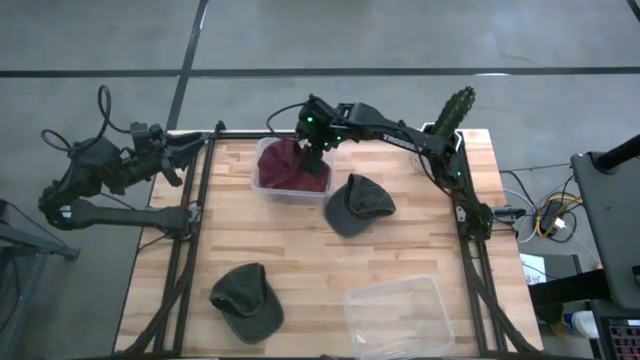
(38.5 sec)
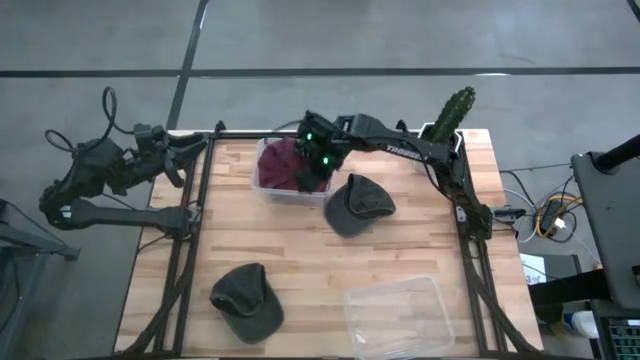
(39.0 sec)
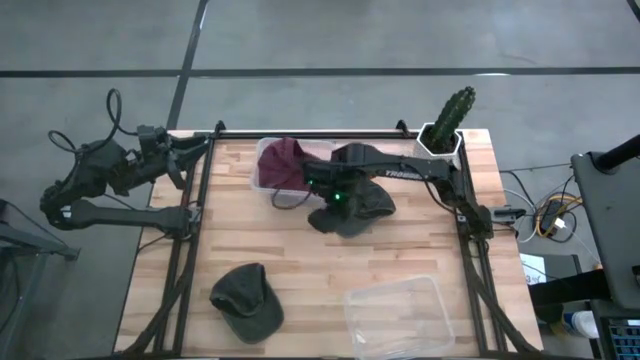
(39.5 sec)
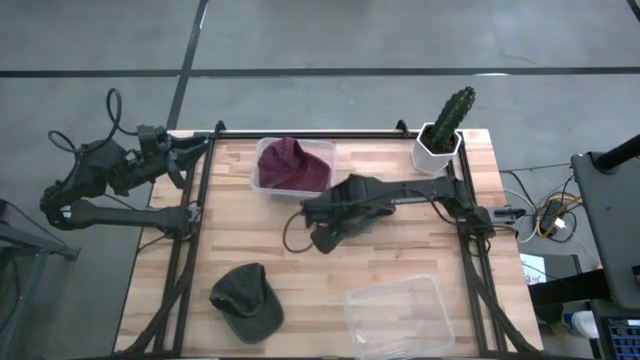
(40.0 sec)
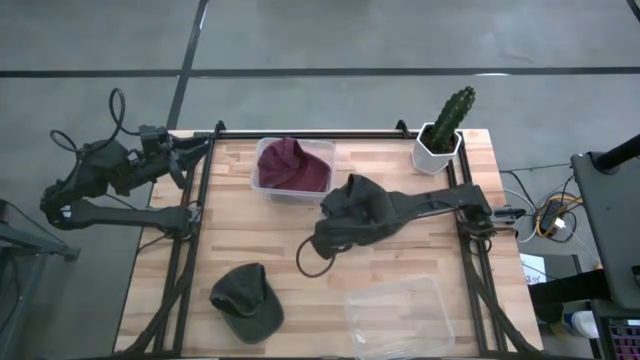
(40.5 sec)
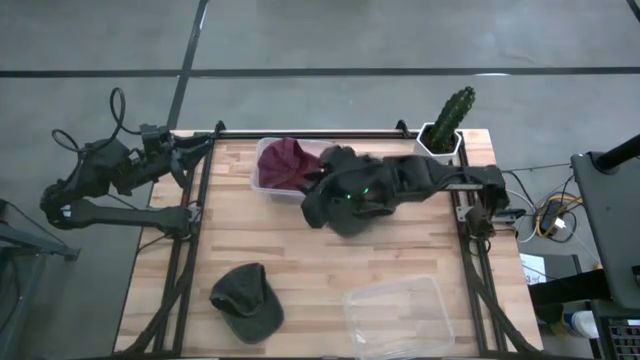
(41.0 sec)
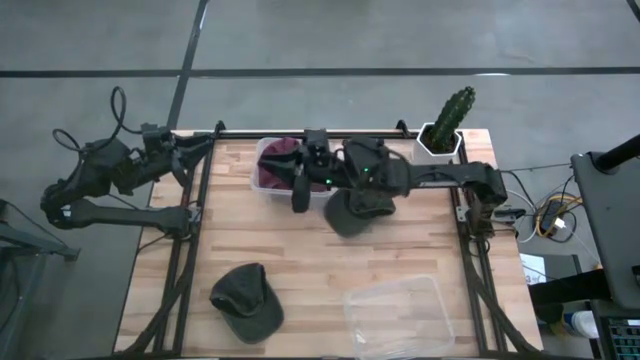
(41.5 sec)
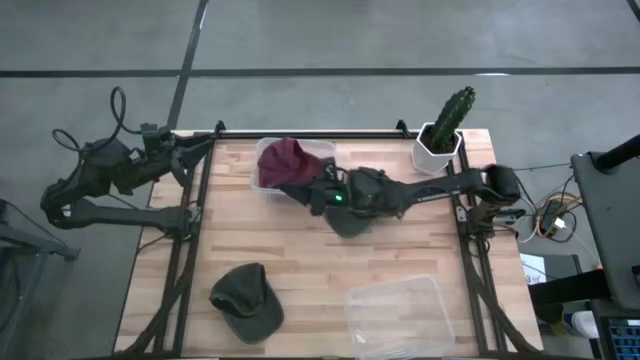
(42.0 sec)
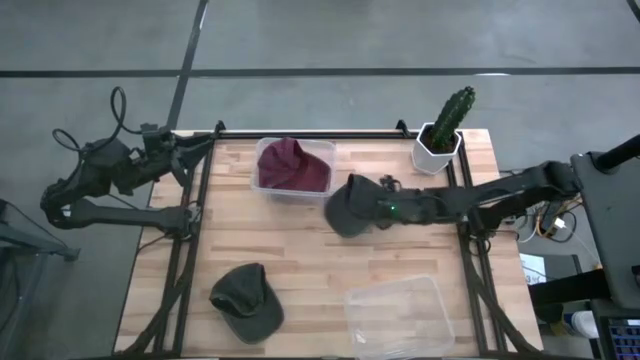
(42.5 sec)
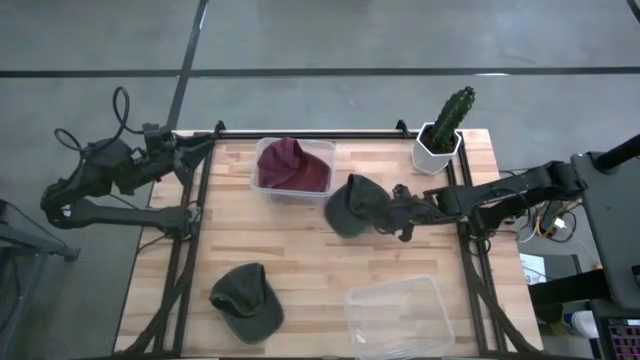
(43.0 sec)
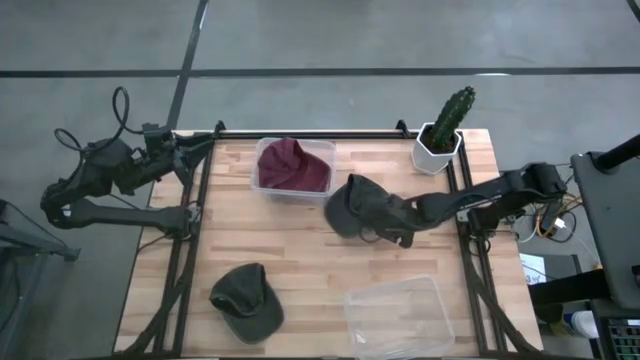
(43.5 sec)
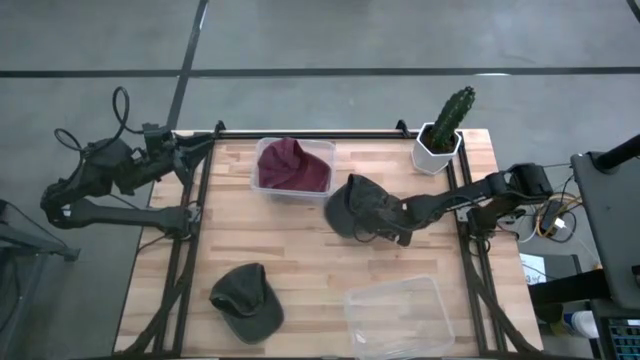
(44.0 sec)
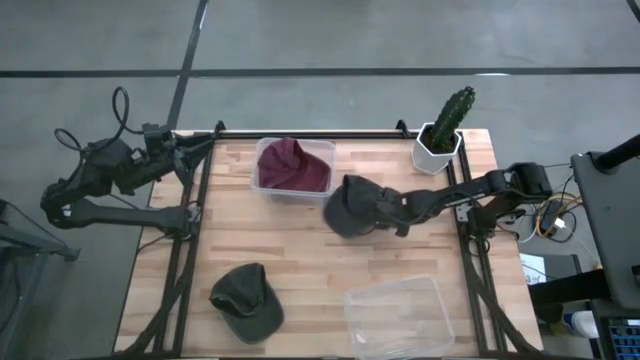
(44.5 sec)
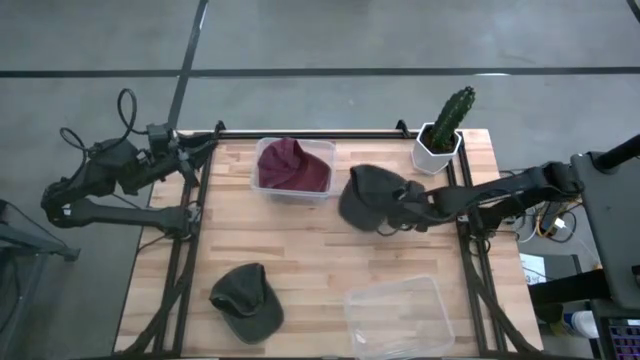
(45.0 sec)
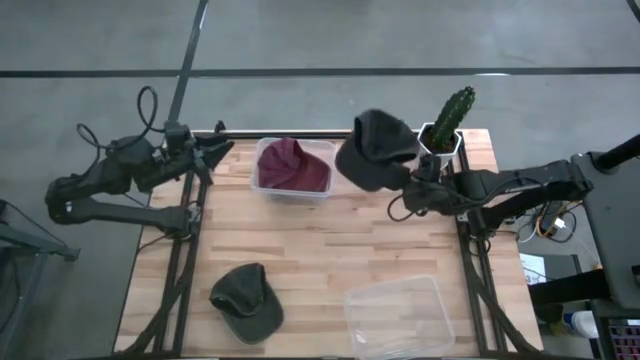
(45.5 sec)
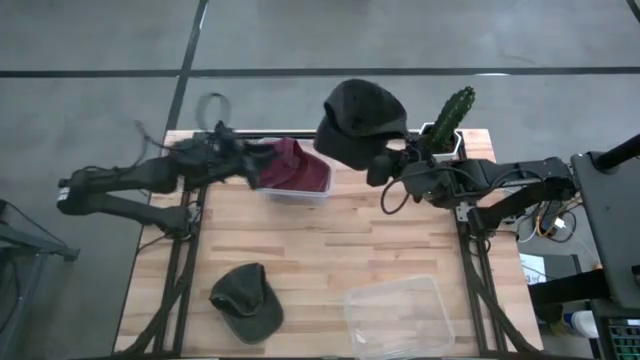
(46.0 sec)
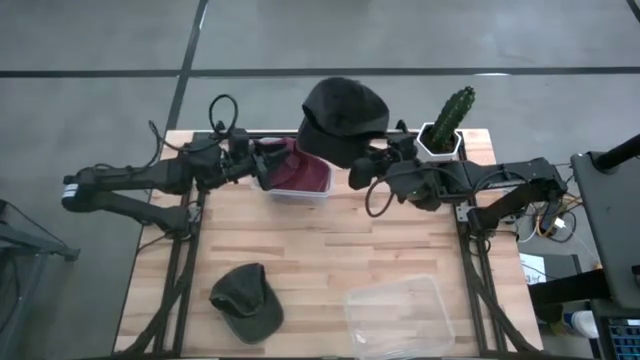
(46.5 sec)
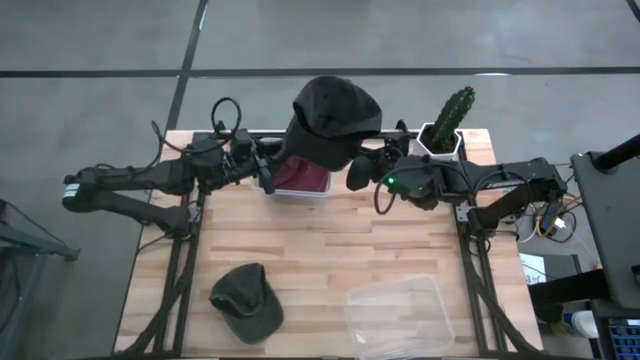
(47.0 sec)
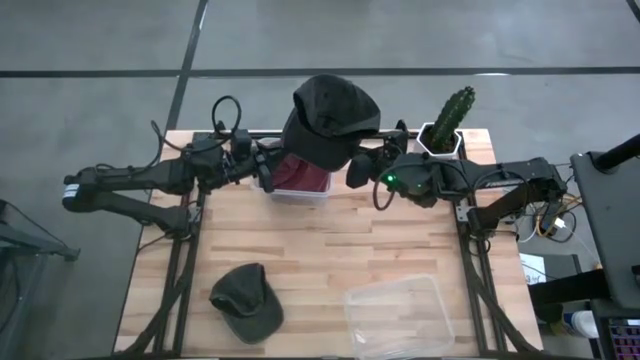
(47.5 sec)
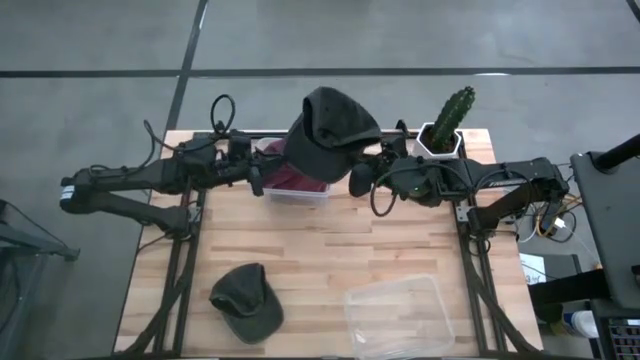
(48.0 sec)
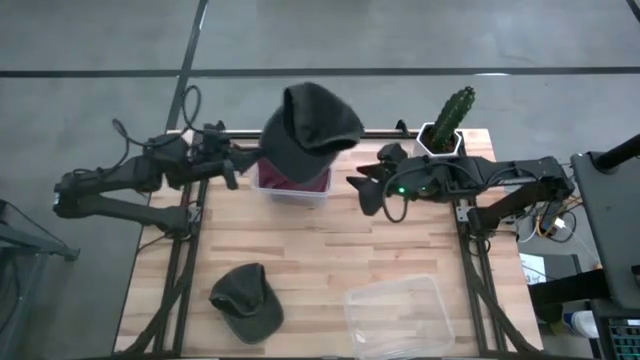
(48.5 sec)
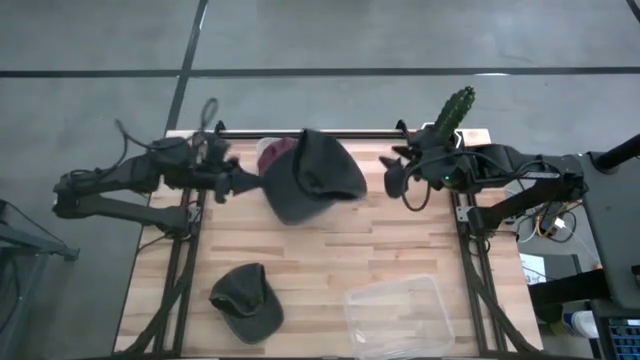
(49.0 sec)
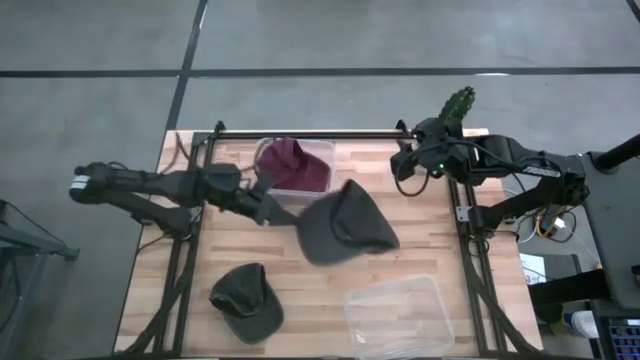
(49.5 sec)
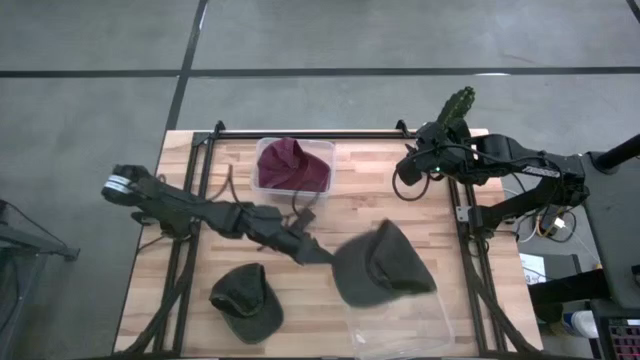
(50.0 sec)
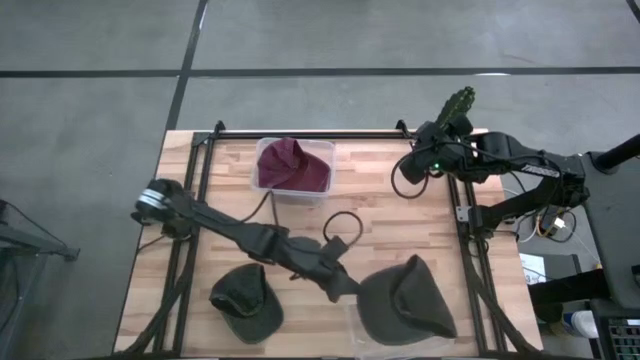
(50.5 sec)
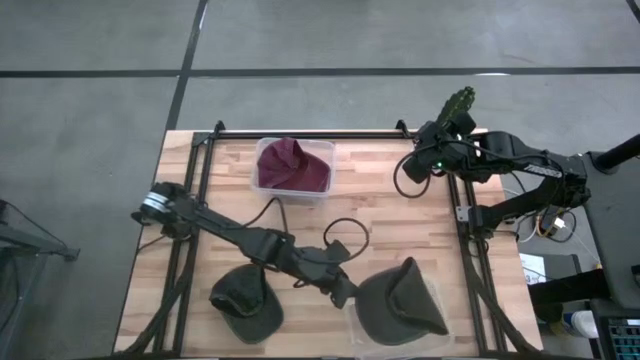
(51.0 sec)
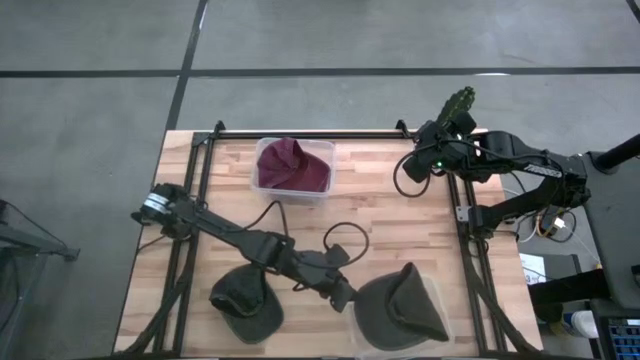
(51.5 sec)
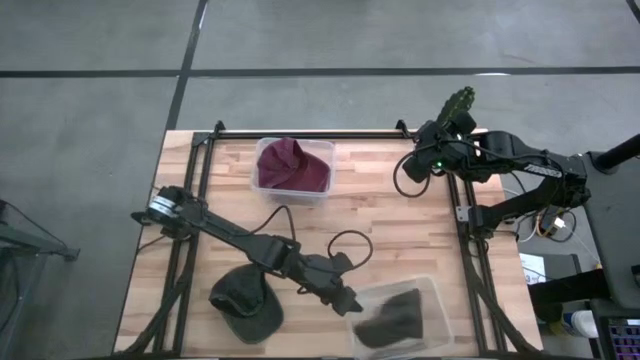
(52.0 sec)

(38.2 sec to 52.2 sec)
Task: Pick and place caps into container
Put the top black cap into the bottom transparent container
